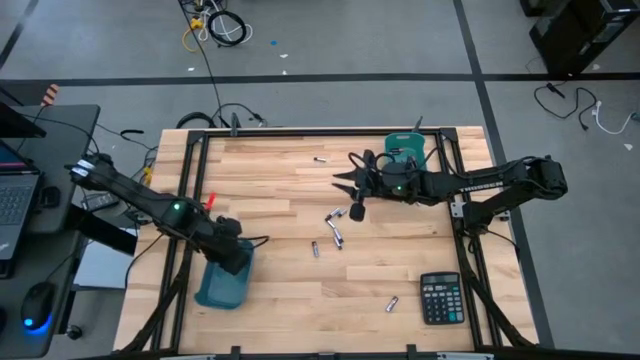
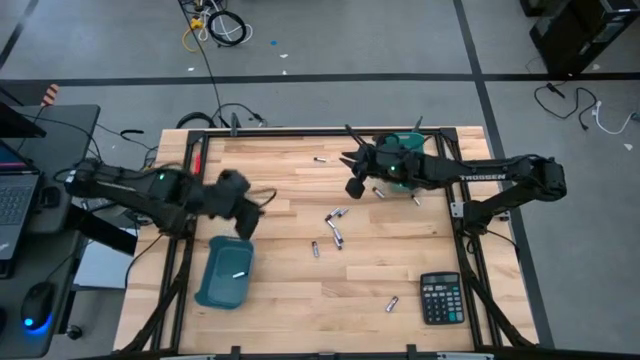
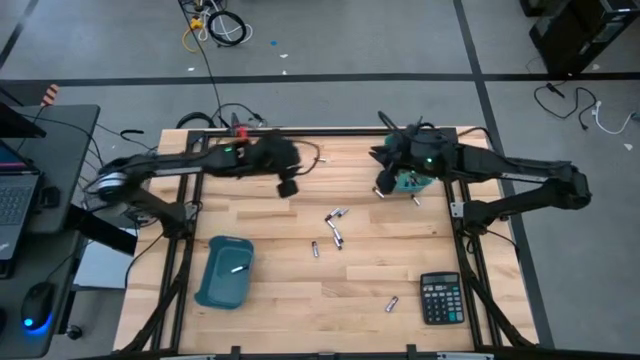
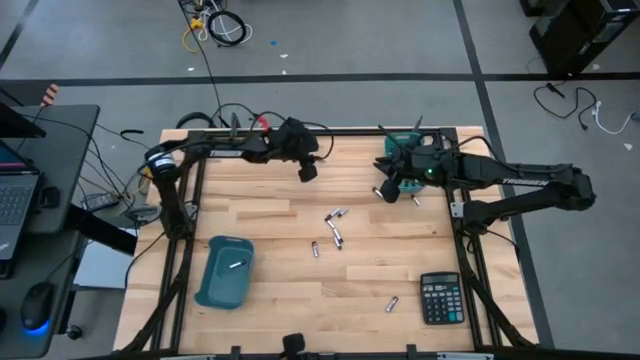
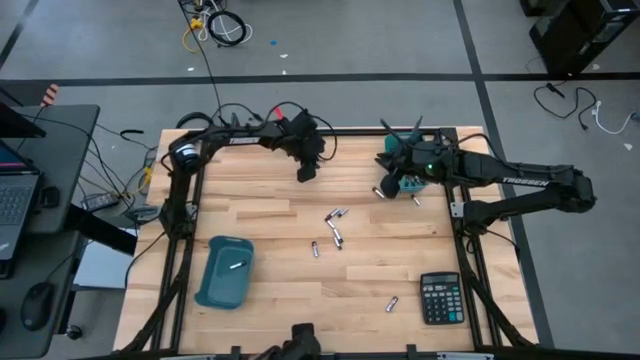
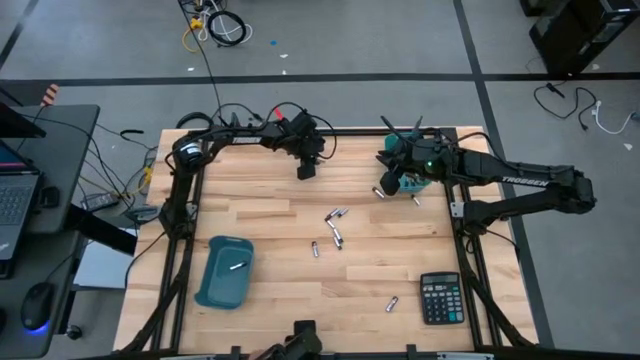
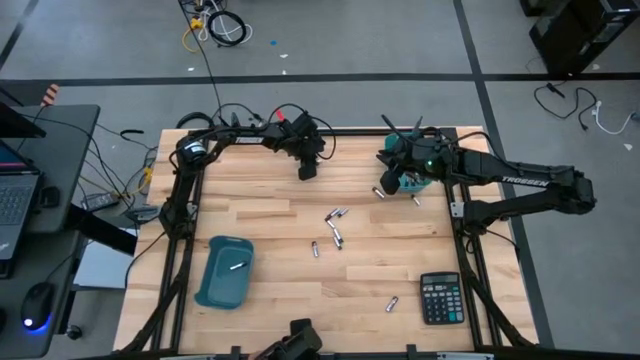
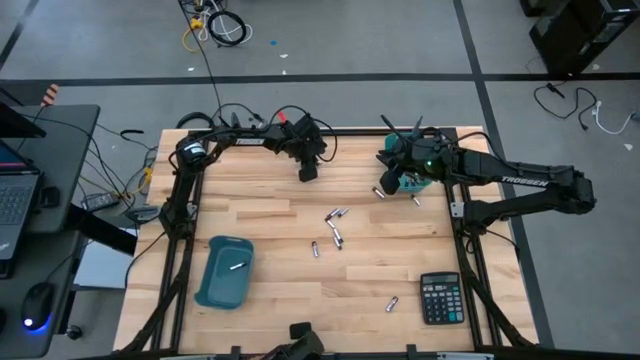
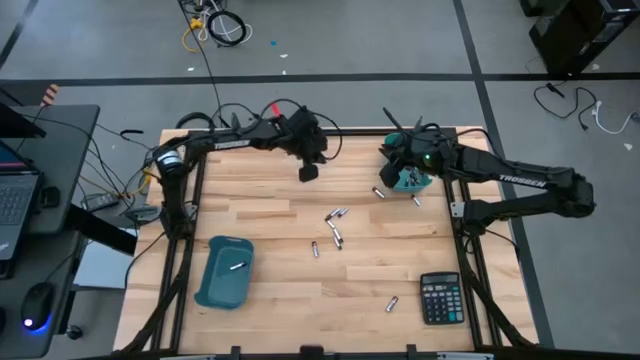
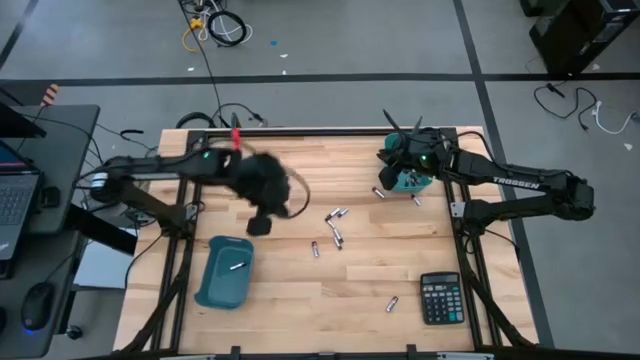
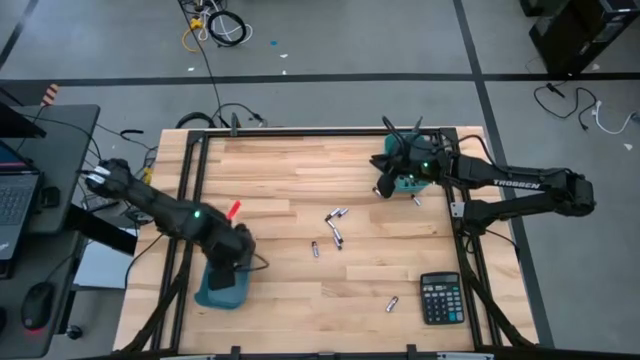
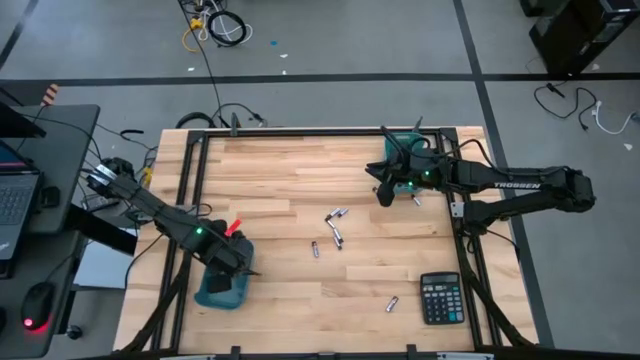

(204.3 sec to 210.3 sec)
Task: Sort batteries
Put the silver battery into the blue bin

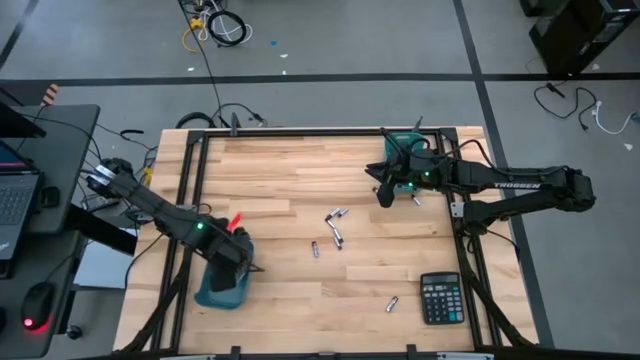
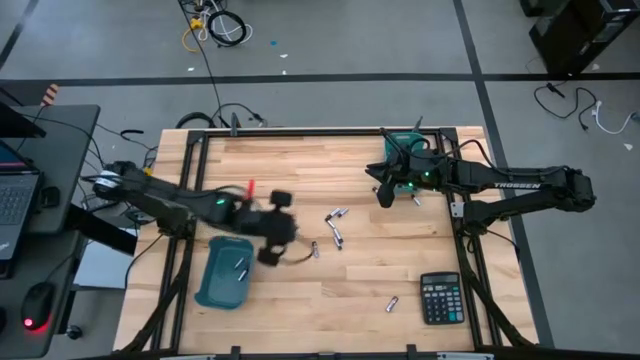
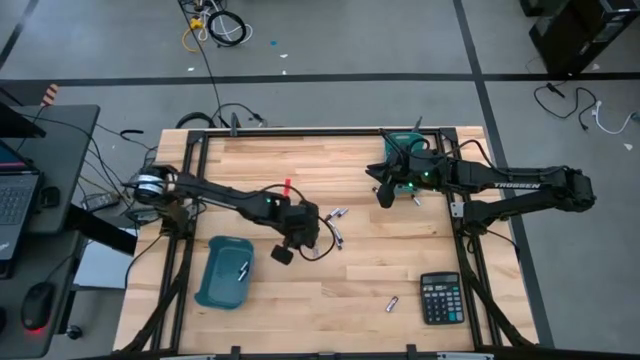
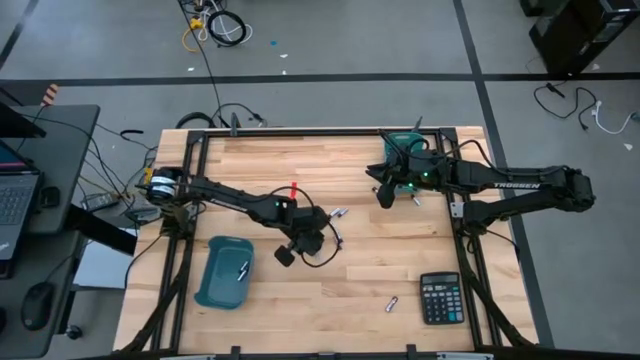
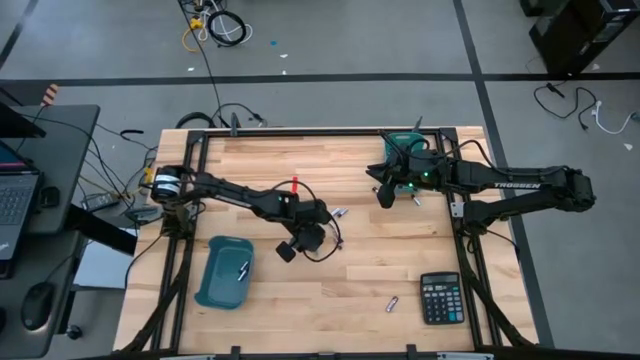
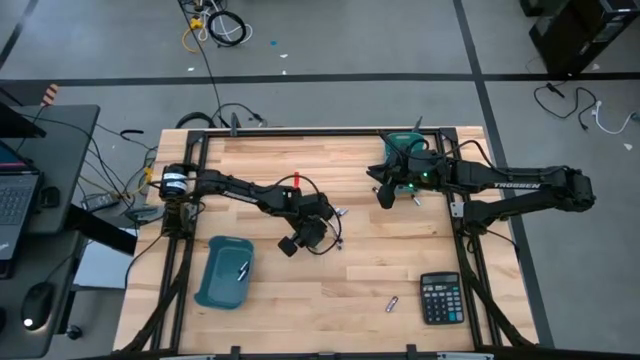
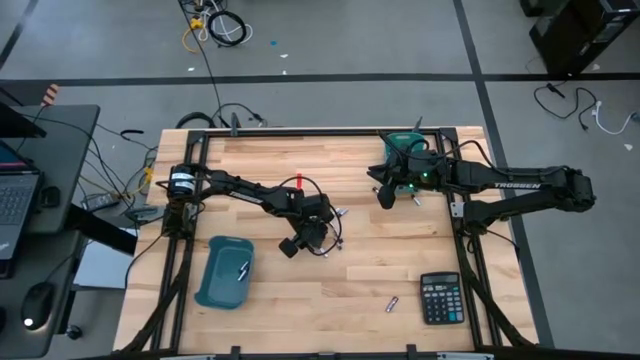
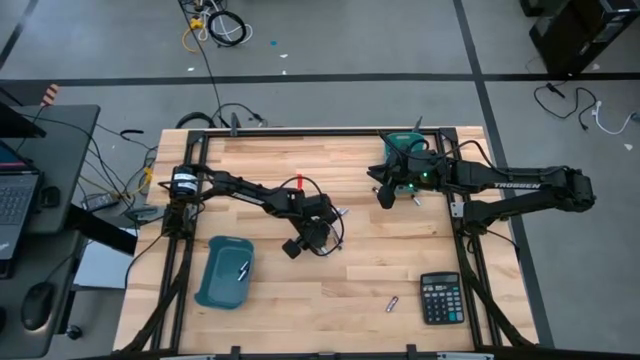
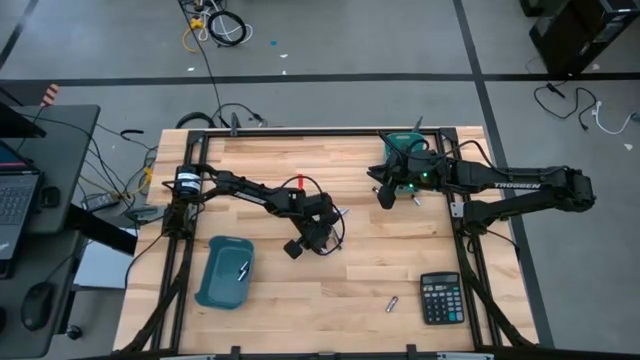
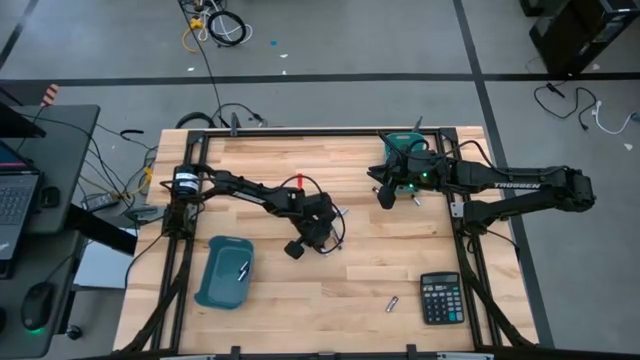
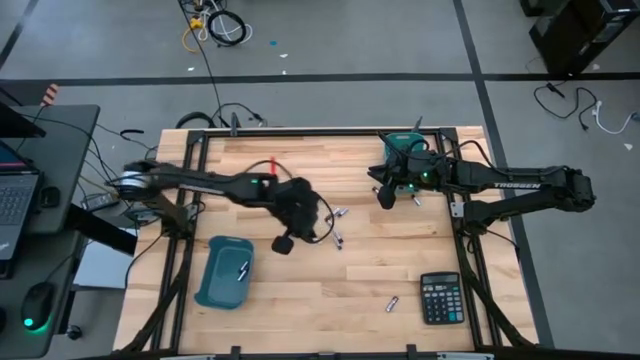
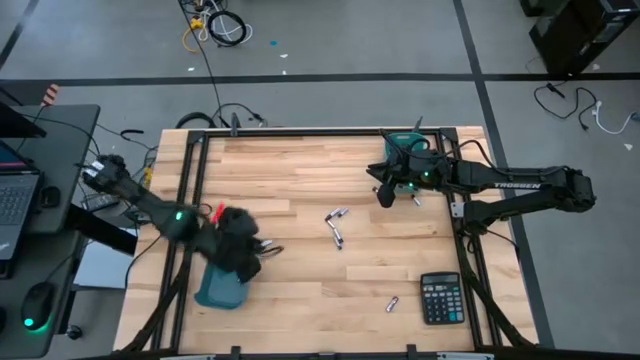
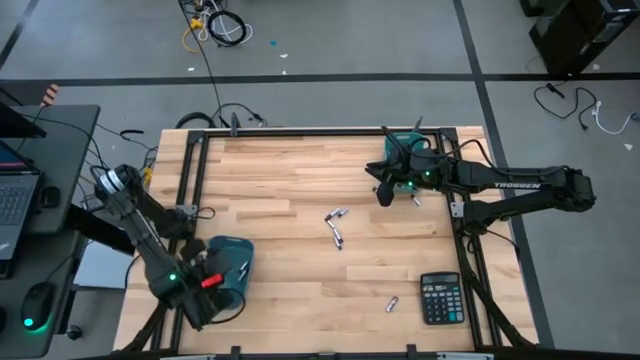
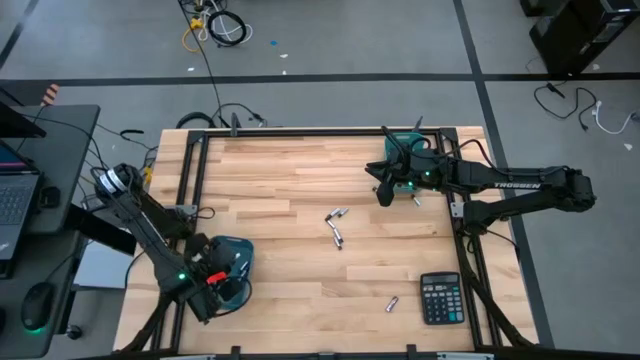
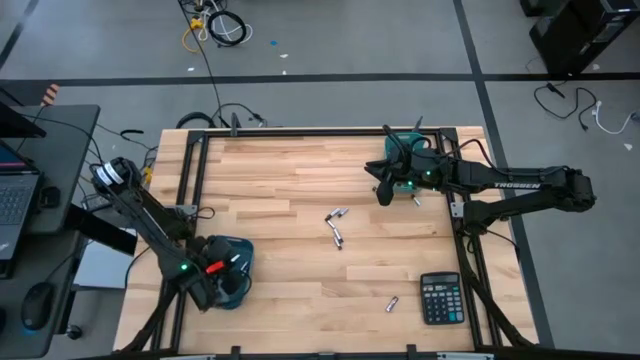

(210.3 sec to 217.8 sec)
Put the silver battery into the blue bin

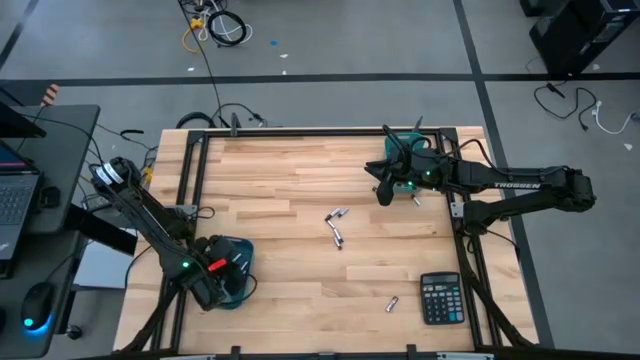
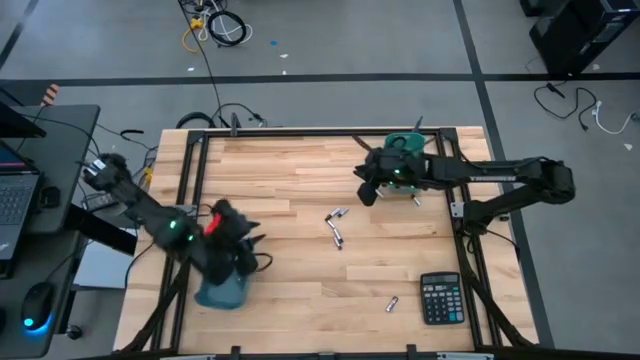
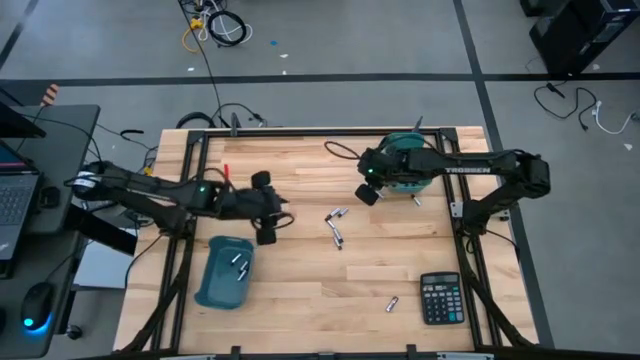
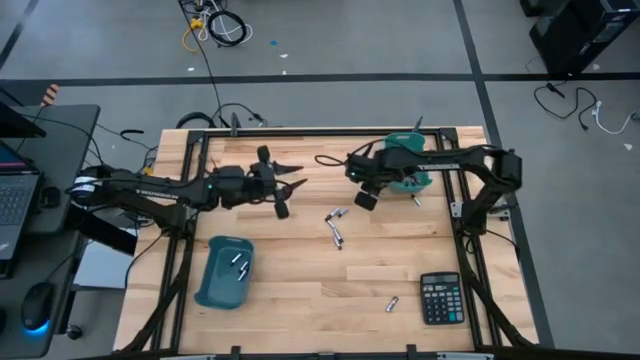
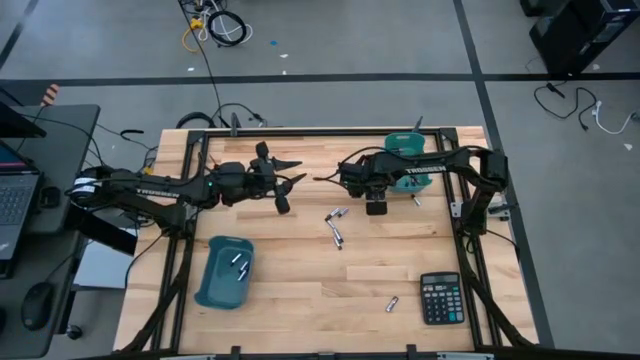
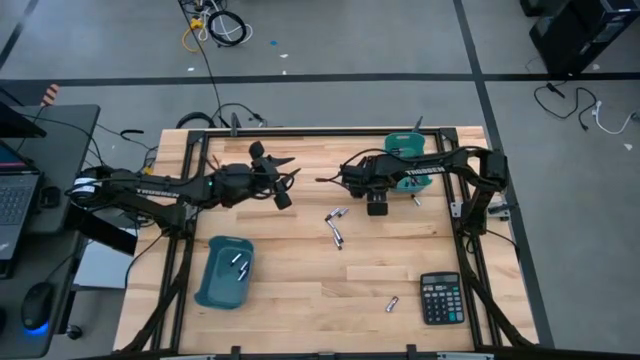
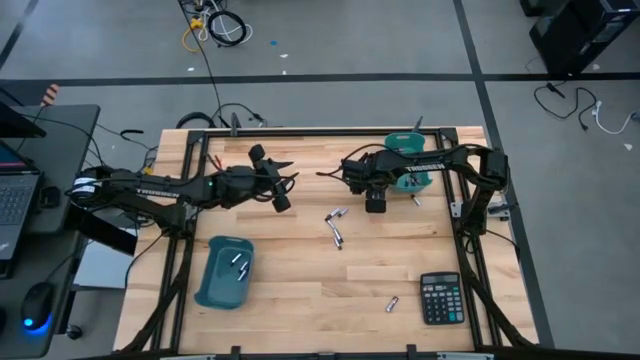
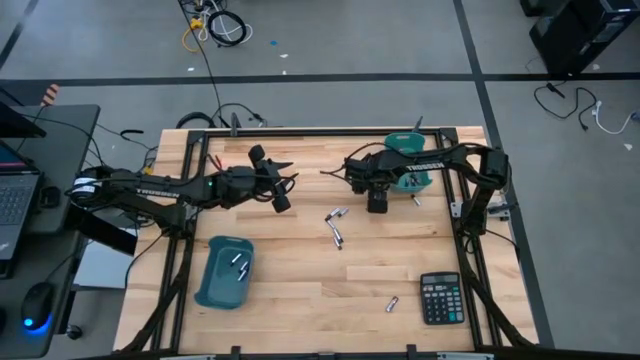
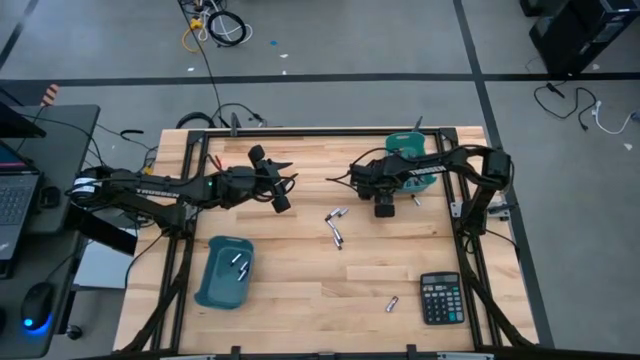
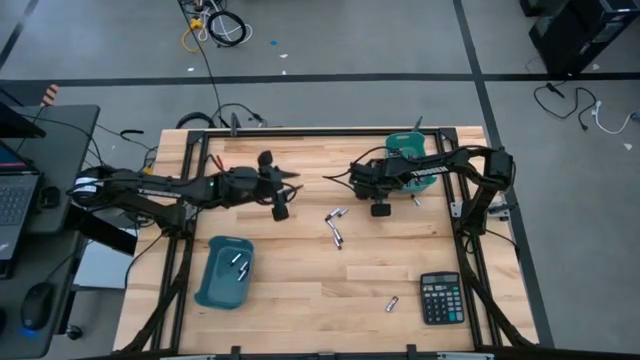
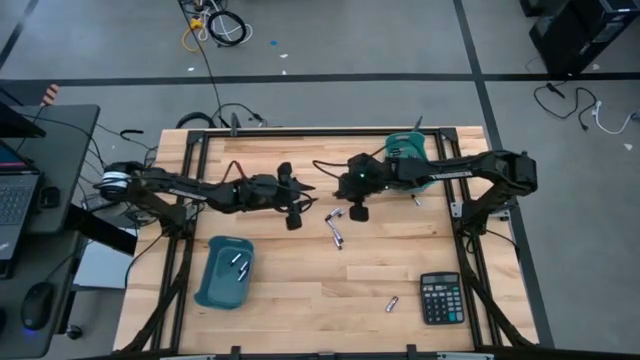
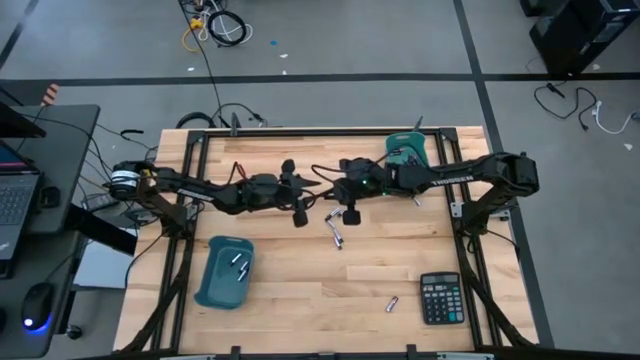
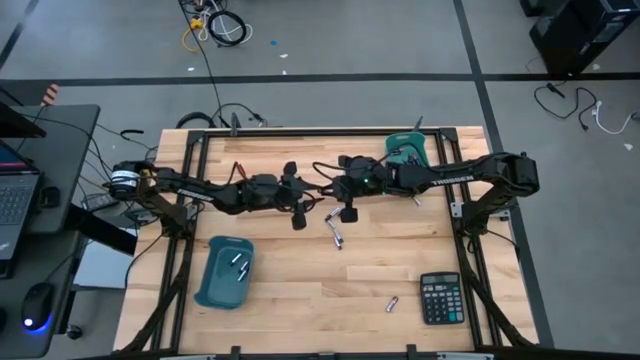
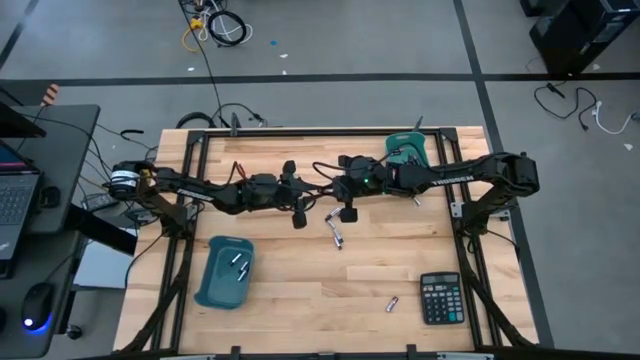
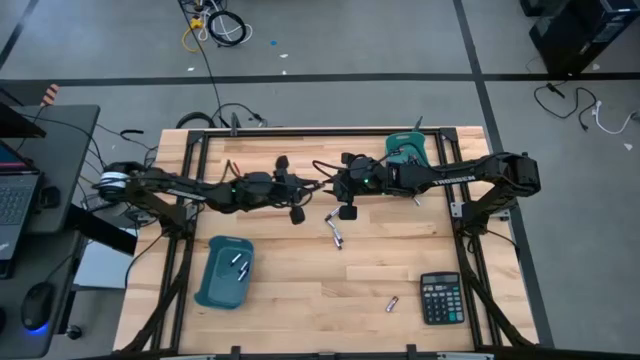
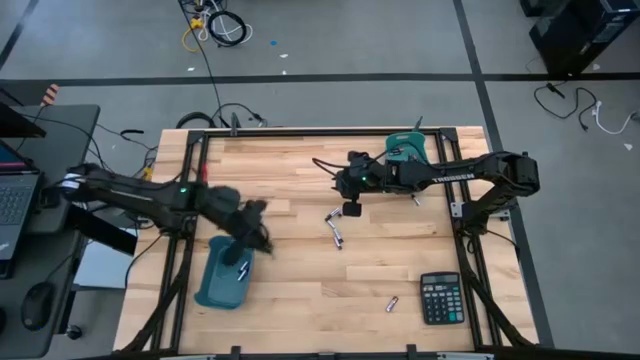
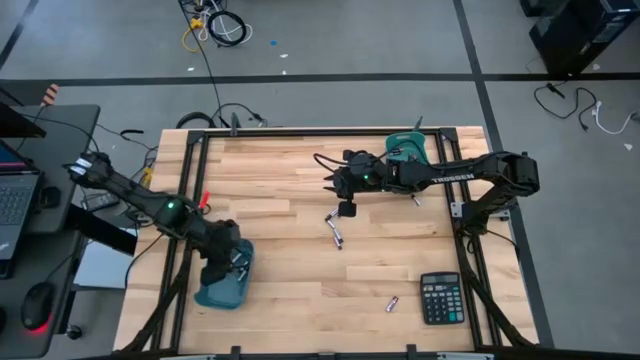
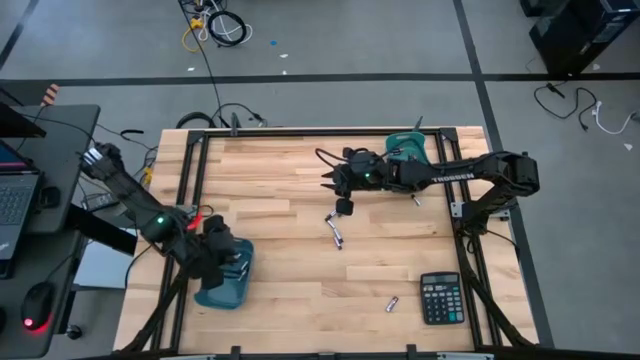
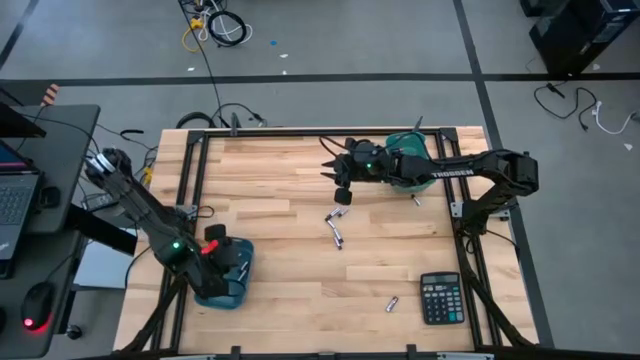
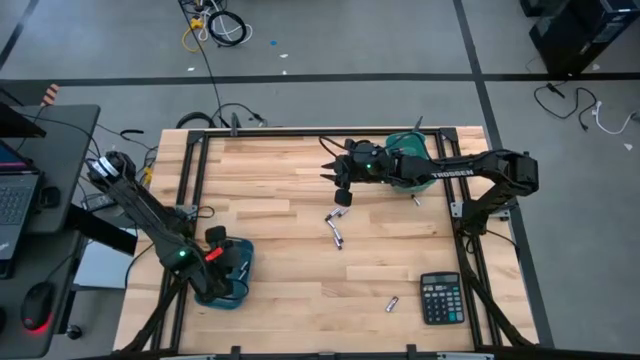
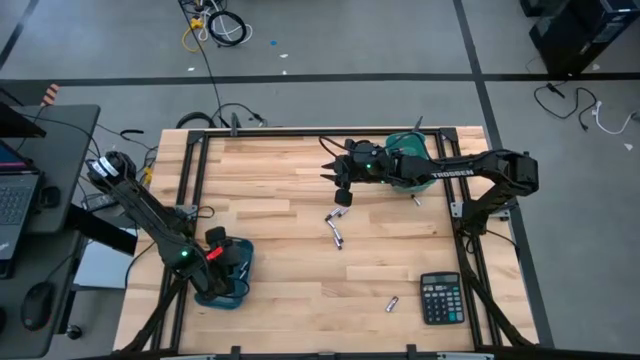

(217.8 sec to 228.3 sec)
Put the silver battery into the blue bin
